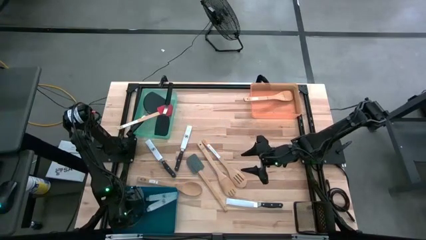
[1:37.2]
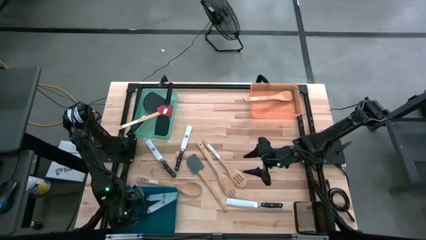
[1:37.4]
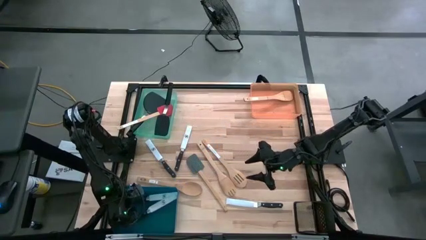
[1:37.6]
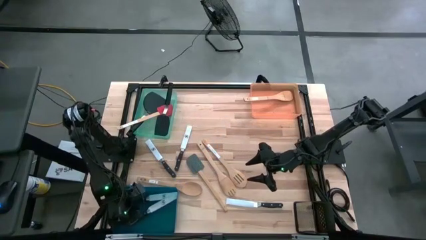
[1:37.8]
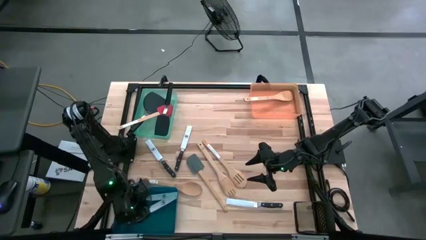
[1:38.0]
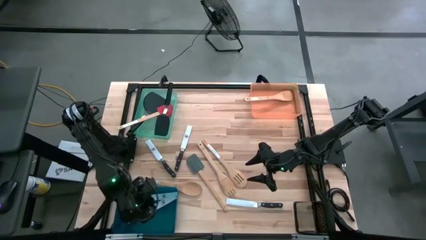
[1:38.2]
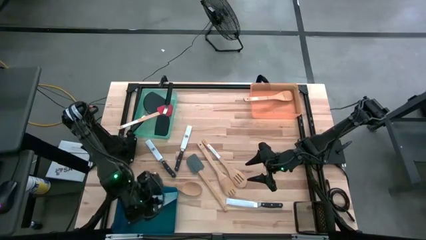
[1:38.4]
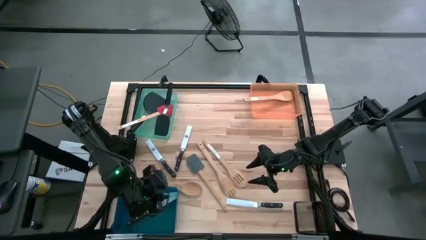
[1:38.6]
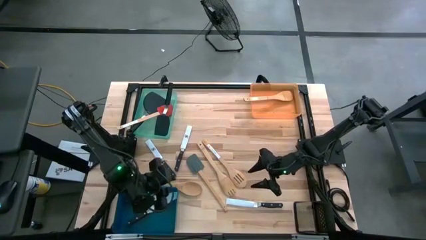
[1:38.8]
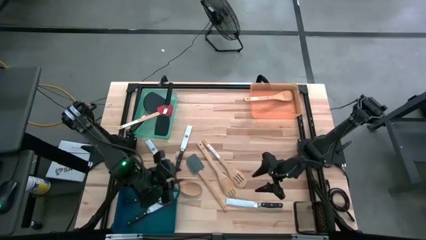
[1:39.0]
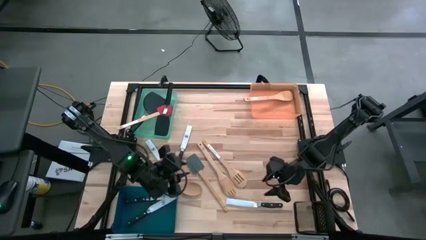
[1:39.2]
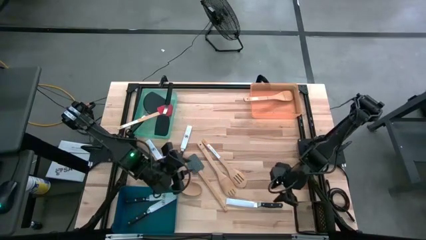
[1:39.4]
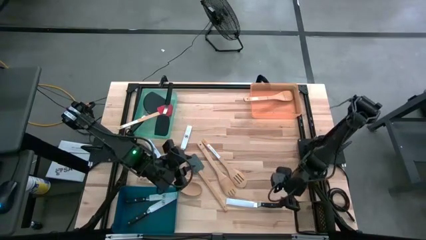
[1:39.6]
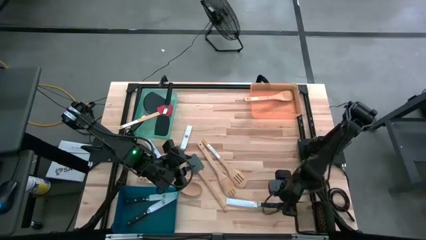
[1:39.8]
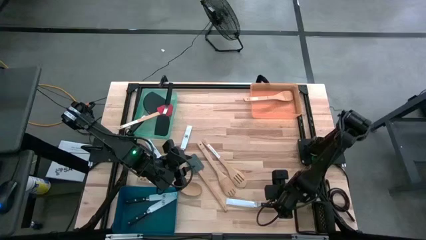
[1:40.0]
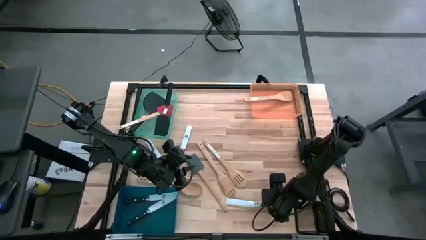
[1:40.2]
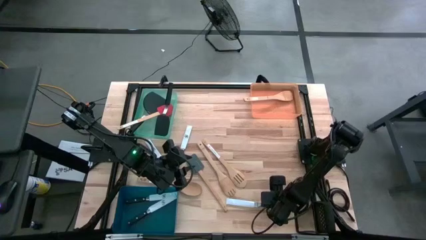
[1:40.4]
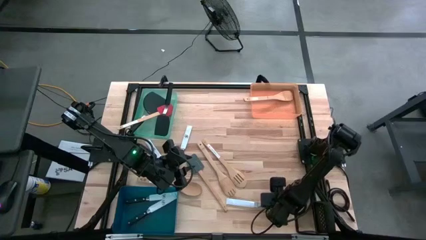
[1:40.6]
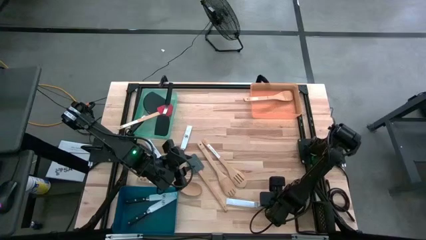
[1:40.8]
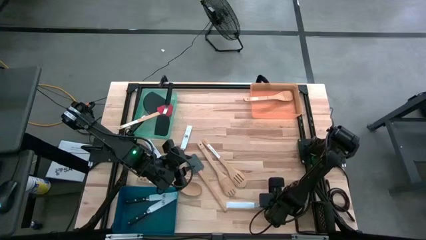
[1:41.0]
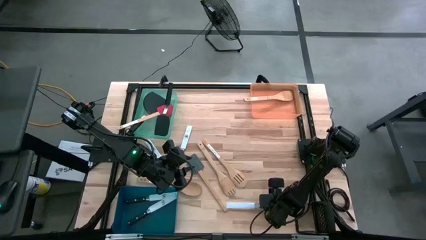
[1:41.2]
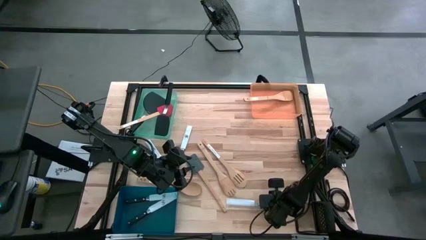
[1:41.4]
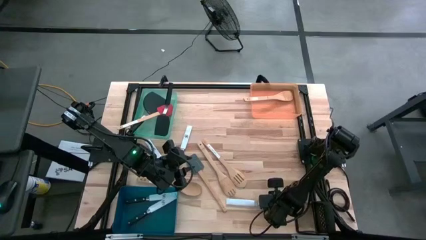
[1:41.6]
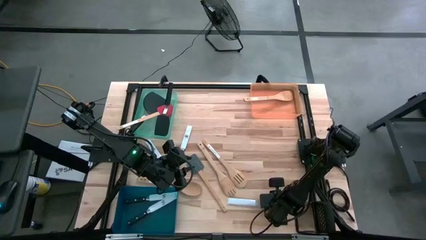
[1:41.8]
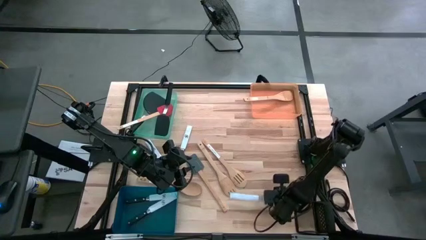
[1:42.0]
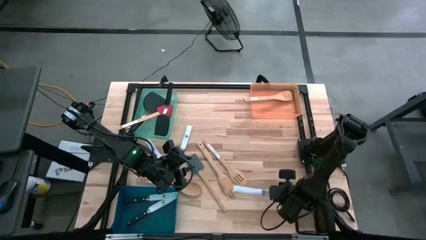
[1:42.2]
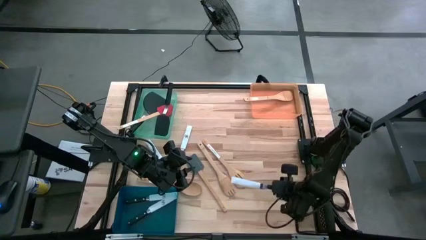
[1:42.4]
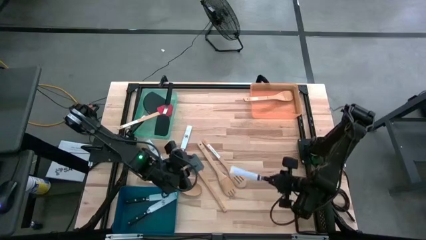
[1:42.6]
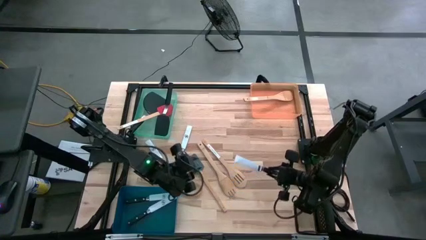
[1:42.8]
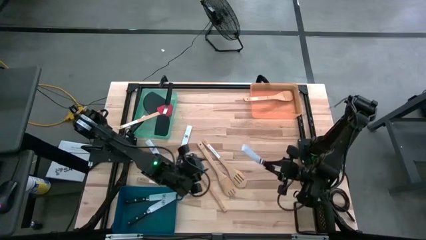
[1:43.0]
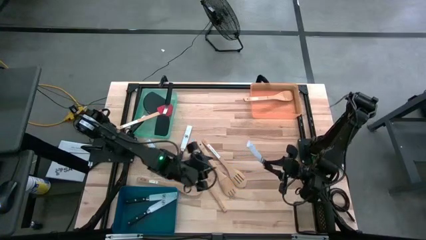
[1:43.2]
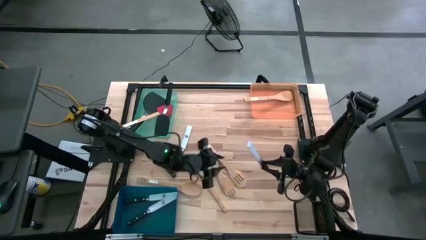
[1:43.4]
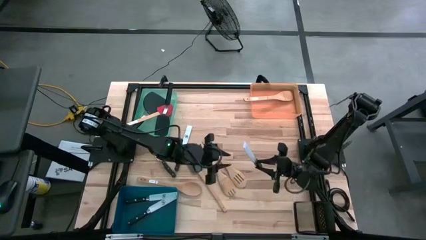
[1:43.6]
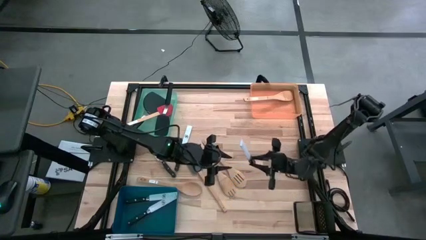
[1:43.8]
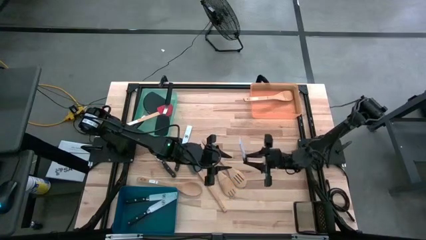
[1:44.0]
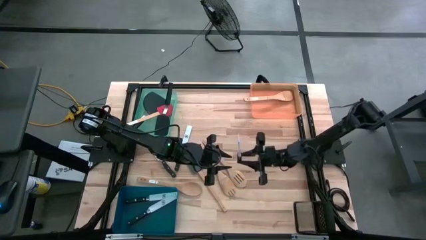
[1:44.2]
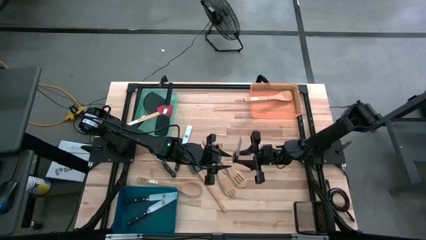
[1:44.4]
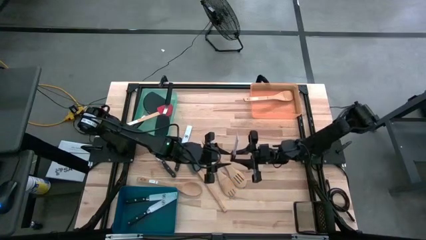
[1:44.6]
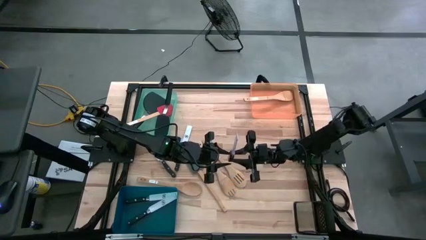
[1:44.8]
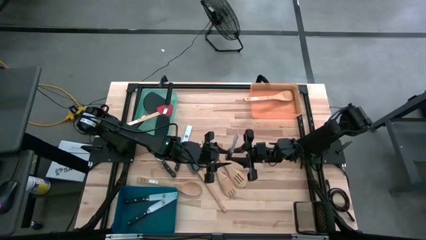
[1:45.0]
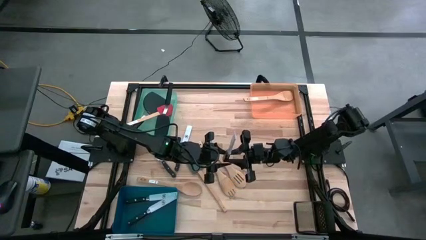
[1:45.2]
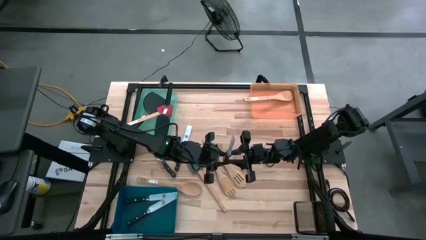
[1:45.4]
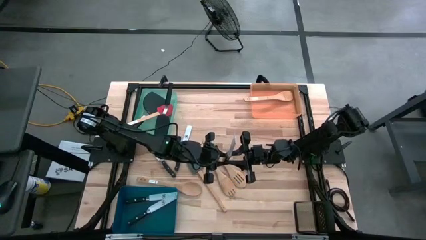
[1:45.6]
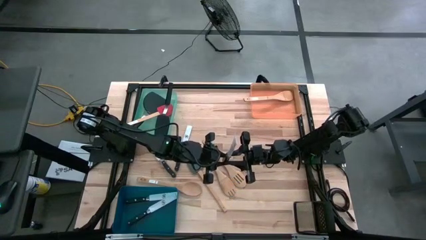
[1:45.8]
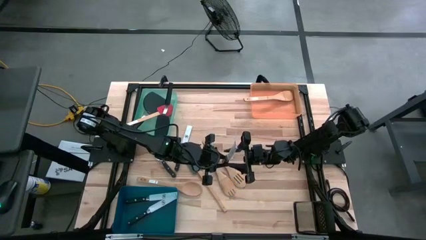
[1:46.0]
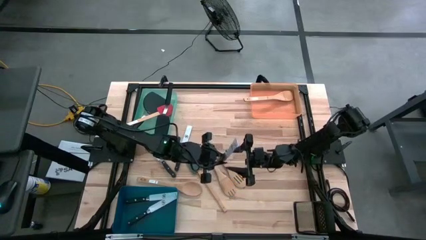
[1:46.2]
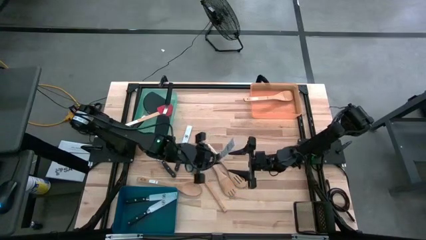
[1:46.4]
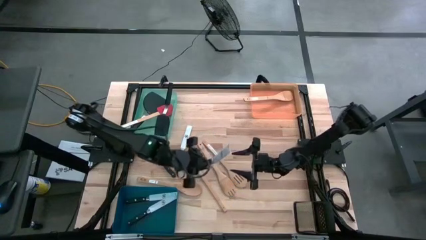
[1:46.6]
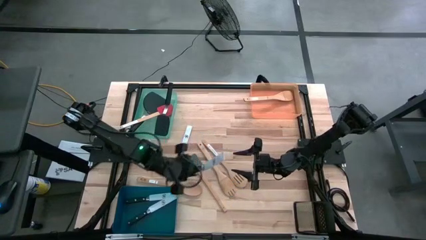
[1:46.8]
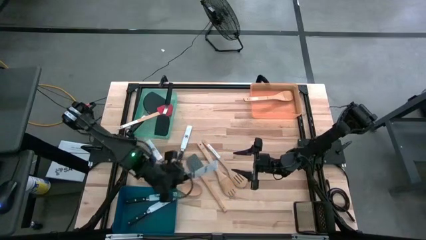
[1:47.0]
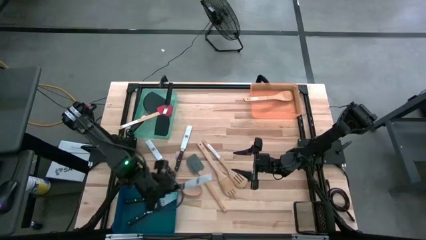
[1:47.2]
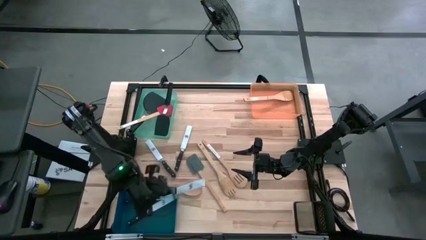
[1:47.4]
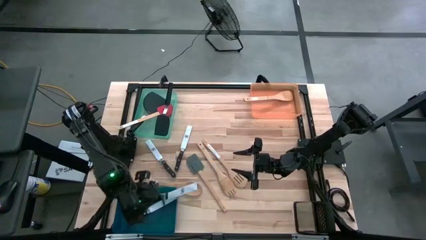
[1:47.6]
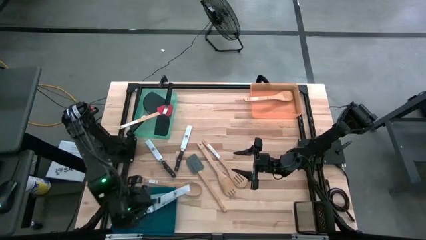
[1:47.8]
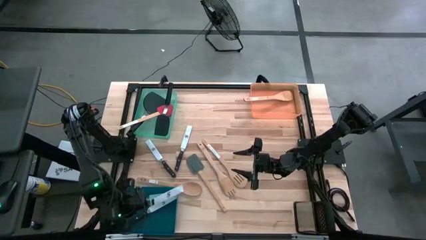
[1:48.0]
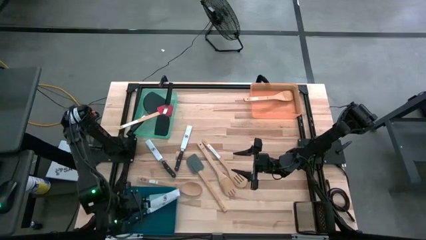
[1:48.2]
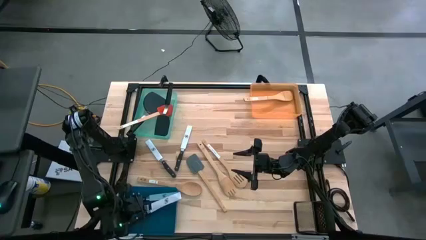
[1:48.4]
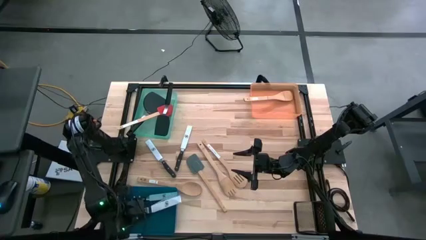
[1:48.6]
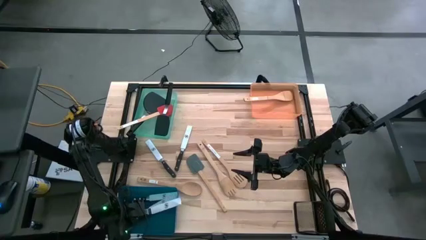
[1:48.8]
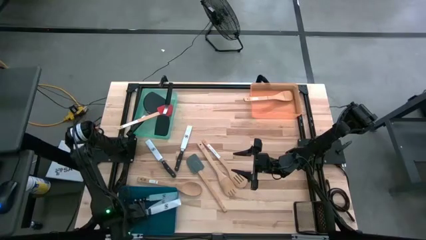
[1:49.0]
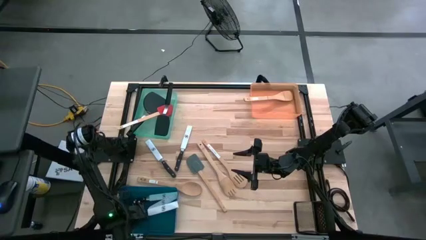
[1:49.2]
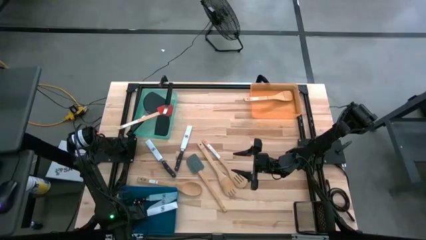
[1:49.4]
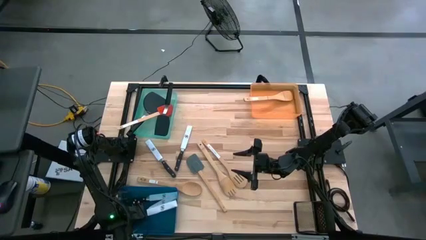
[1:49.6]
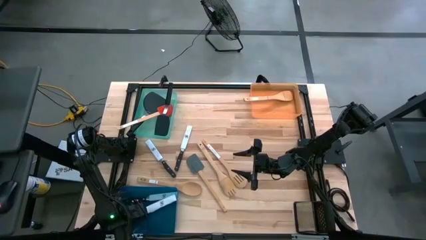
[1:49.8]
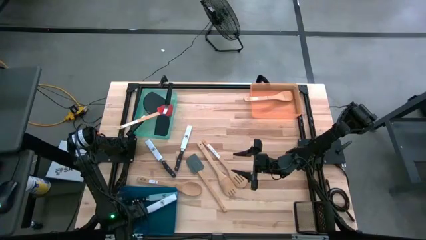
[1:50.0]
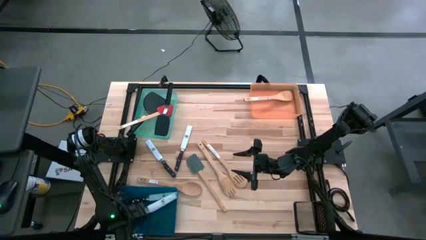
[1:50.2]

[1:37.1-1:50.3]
Task: Pick & Place Kitchen Items
Put the black knife into the blue bin

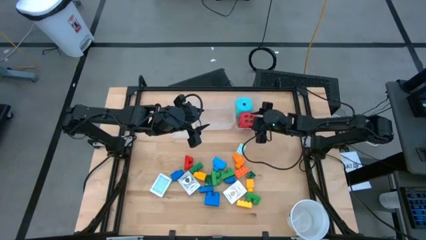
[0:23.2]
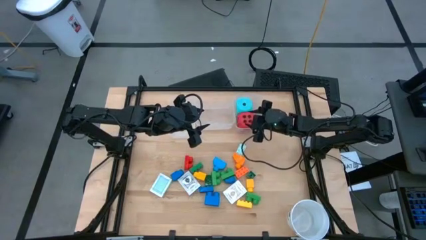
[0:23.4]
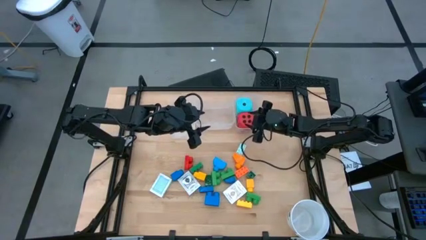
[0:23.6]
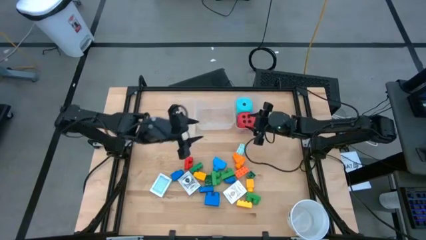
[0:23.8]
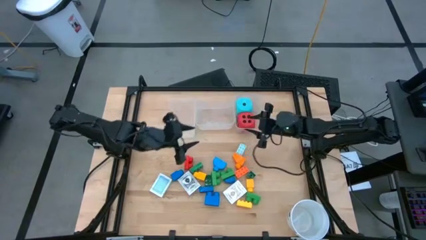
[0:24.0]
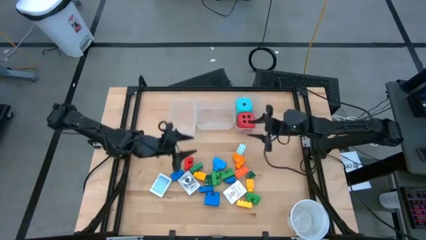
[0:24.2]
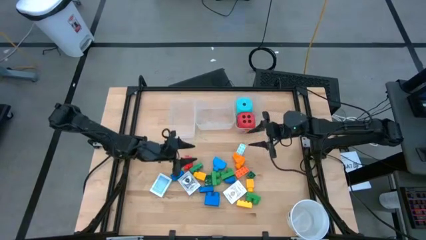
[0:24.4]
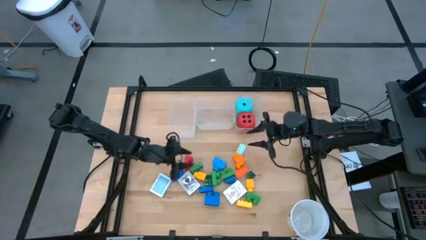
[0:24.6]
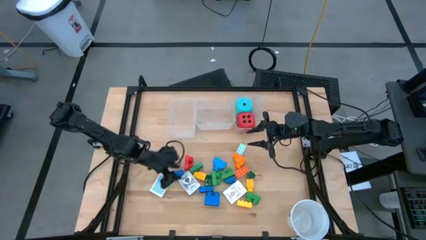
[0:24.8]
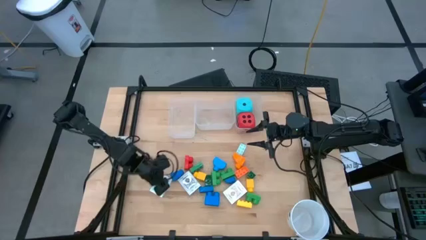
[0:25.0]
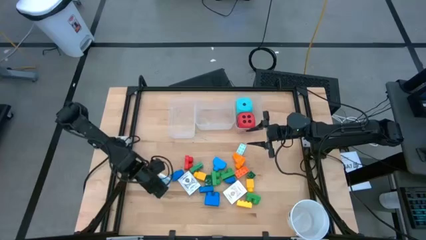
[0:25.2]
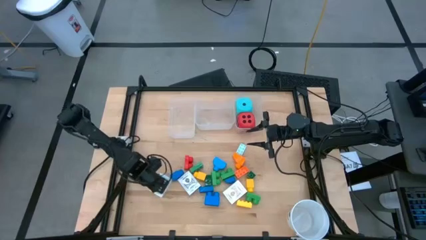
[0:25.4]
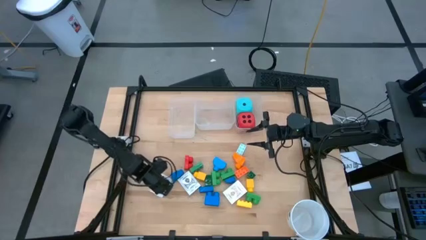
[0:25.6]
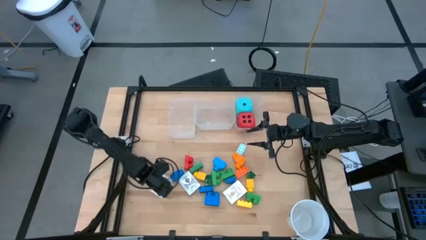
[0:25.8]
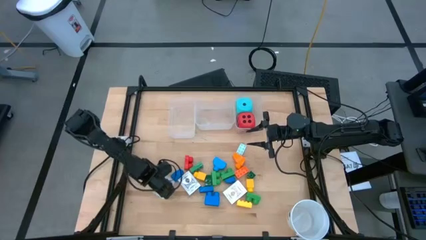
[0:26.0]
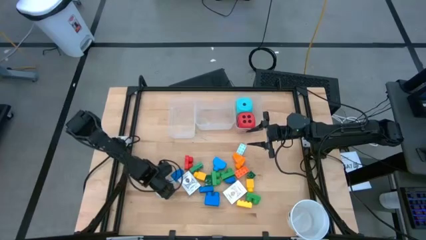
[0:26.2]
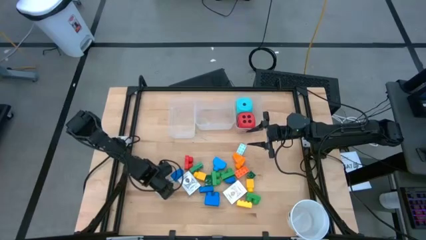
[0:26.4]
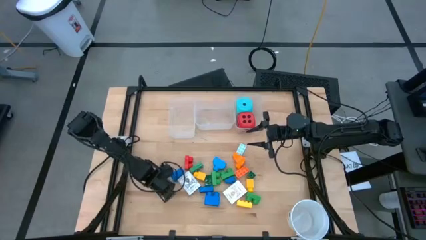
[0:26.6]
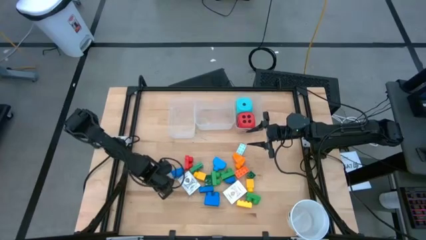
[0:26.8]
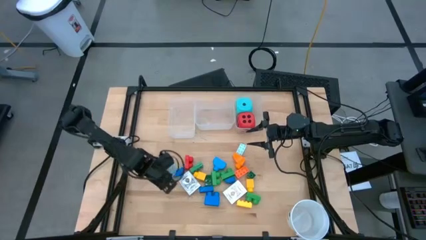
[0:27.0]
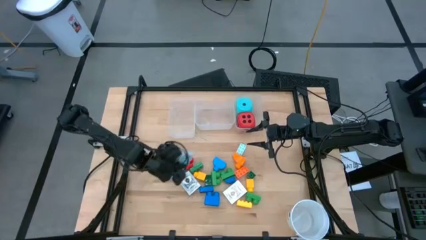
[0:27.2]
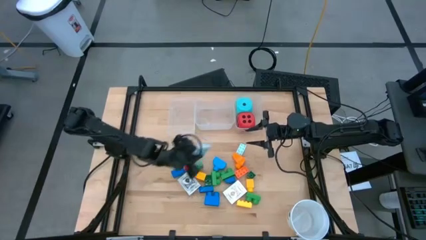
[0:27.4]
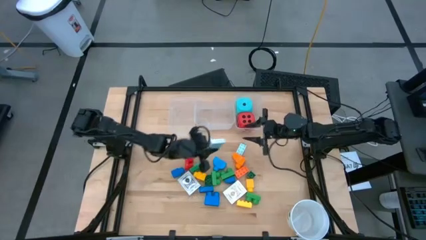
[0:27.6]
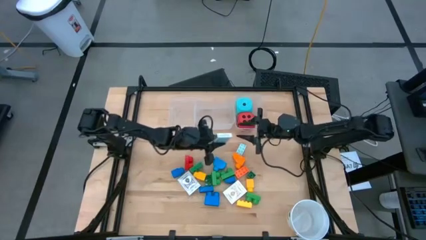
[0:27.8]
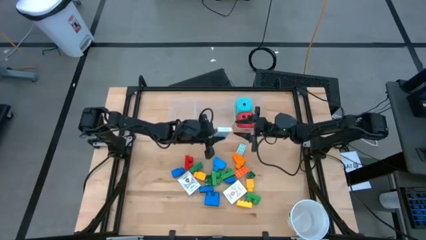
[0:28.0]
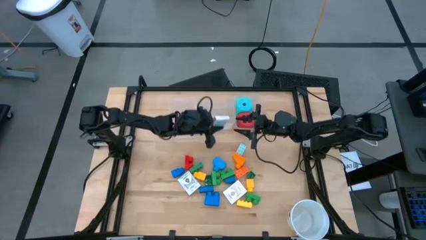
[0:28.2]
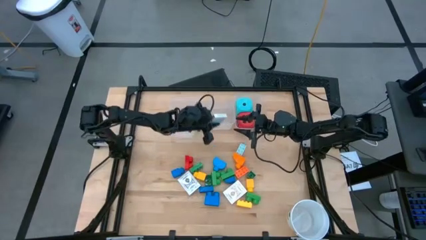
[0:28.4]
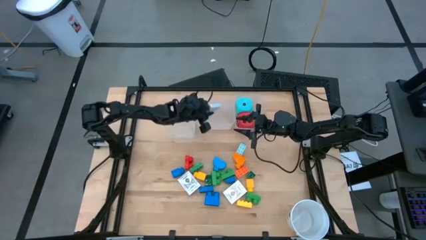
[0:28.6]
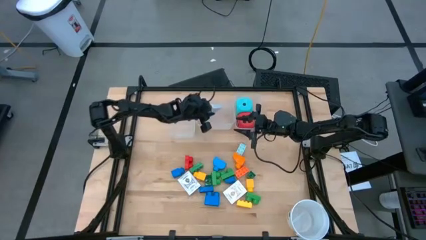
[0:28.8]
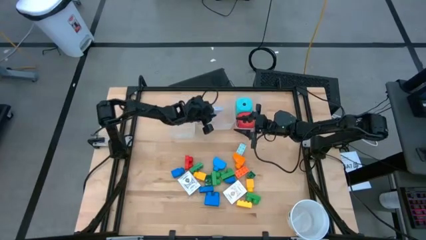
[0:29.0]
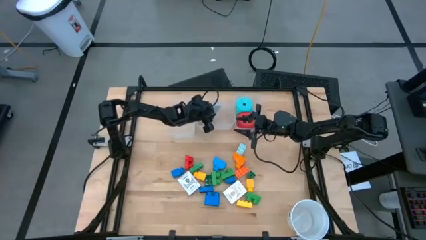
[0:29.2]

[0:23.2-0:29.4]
Task: Pick & Place Toys
Put the blue deck of cards into the middle transparent bin
